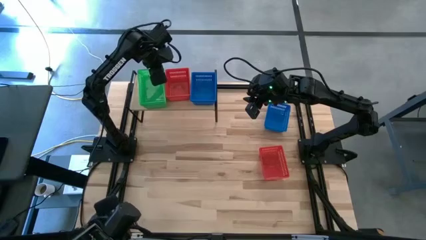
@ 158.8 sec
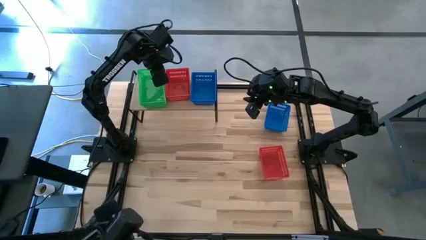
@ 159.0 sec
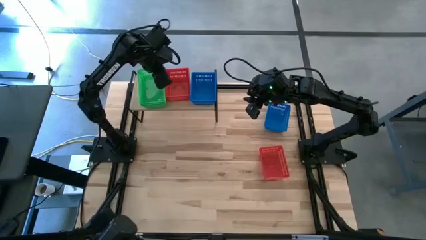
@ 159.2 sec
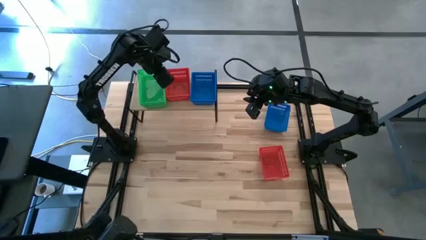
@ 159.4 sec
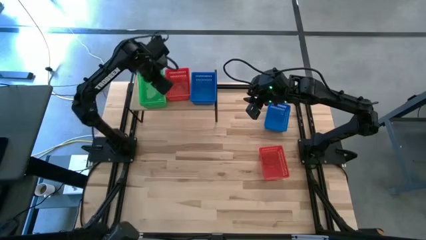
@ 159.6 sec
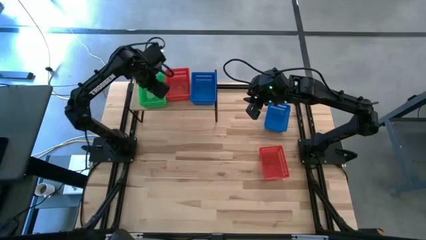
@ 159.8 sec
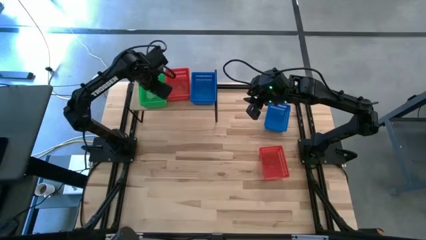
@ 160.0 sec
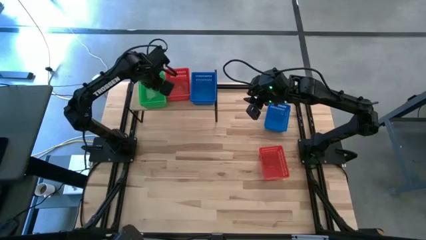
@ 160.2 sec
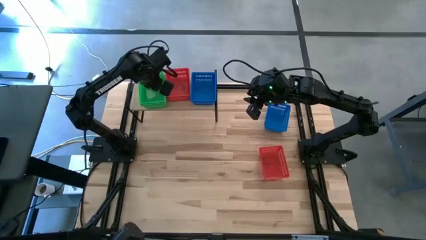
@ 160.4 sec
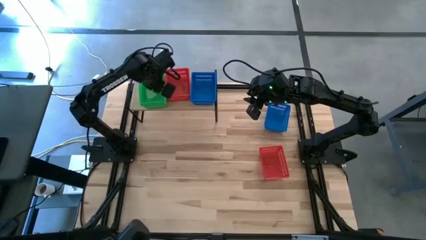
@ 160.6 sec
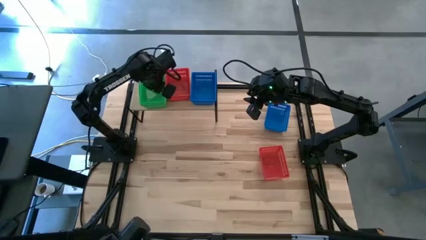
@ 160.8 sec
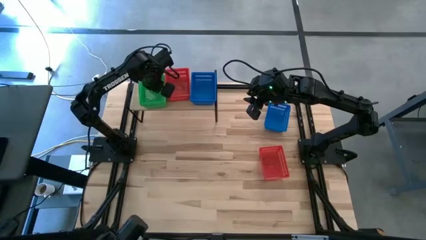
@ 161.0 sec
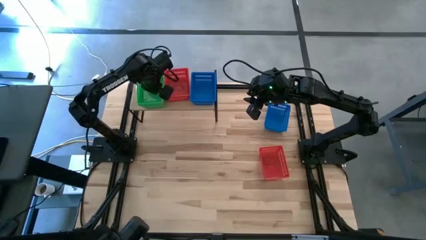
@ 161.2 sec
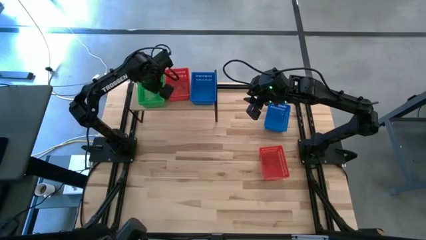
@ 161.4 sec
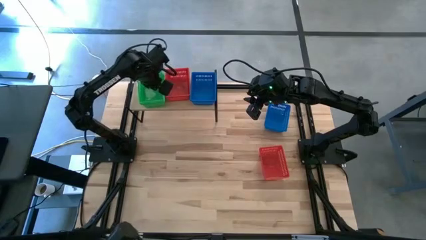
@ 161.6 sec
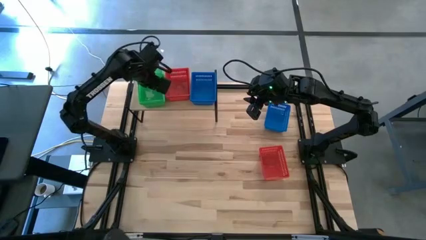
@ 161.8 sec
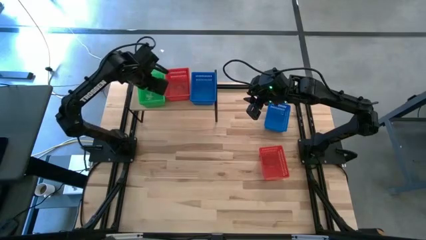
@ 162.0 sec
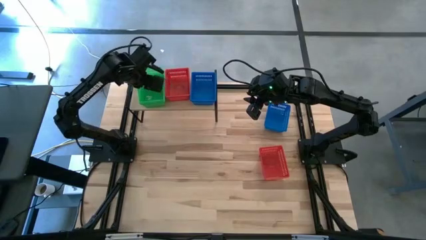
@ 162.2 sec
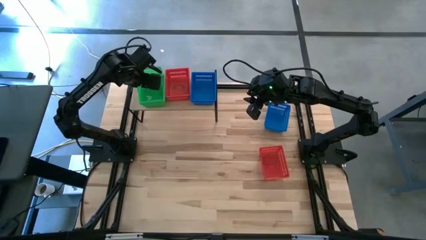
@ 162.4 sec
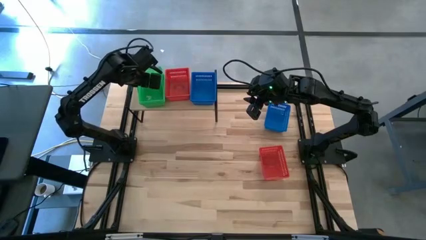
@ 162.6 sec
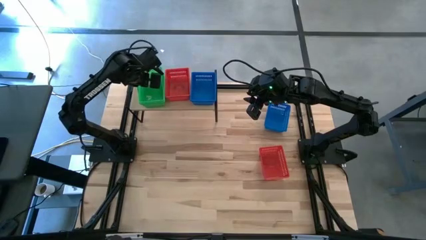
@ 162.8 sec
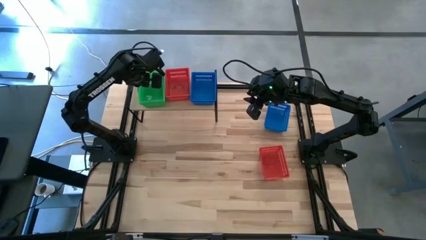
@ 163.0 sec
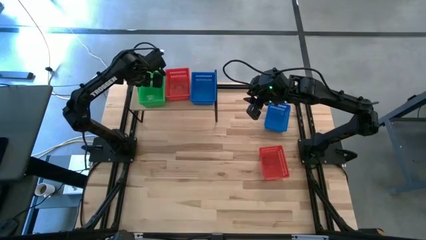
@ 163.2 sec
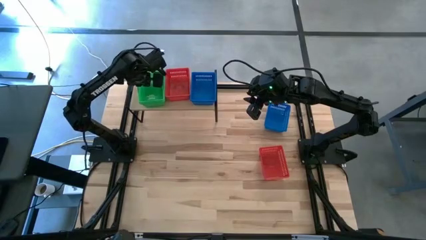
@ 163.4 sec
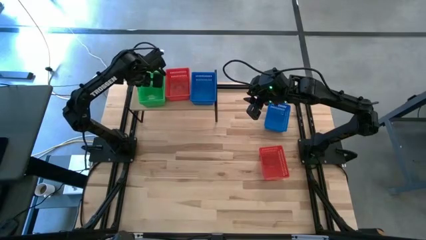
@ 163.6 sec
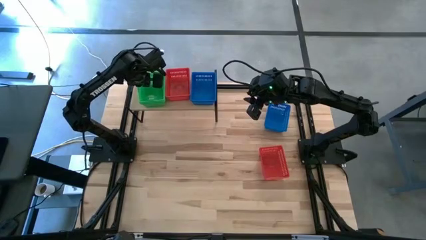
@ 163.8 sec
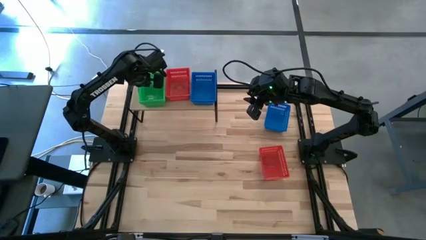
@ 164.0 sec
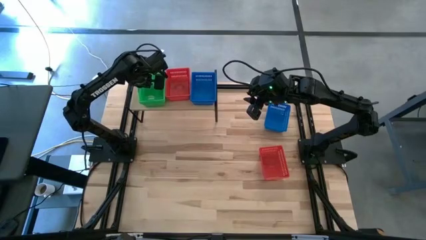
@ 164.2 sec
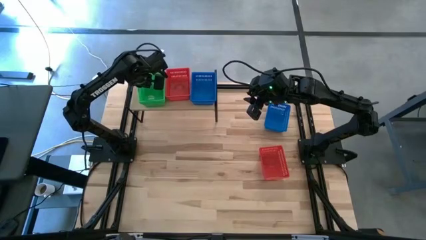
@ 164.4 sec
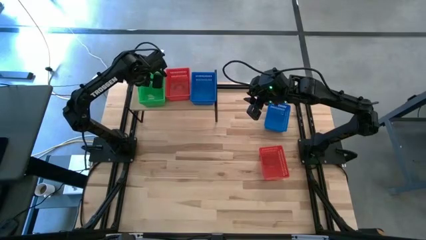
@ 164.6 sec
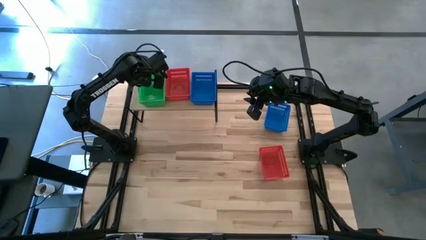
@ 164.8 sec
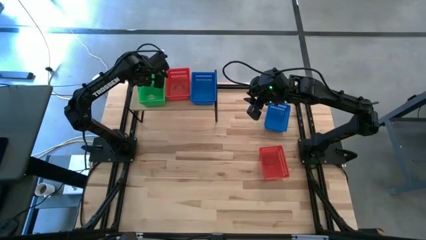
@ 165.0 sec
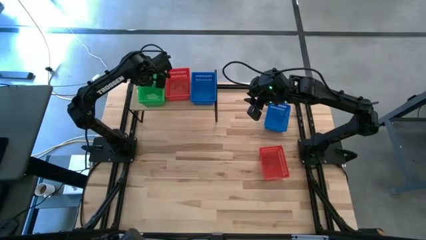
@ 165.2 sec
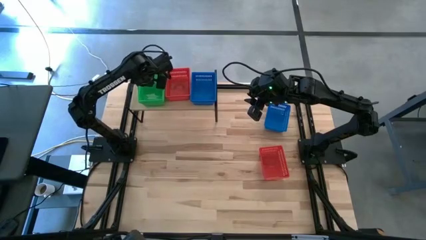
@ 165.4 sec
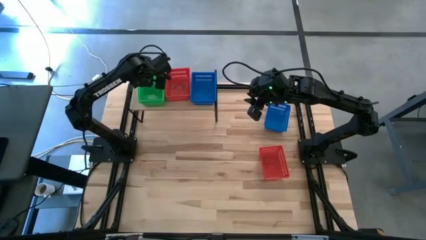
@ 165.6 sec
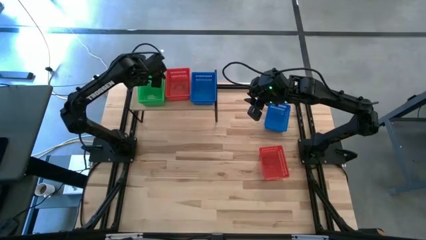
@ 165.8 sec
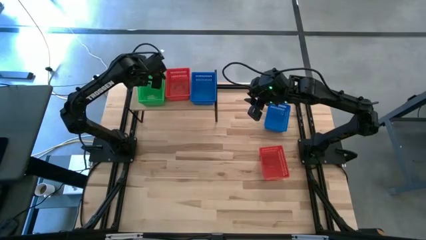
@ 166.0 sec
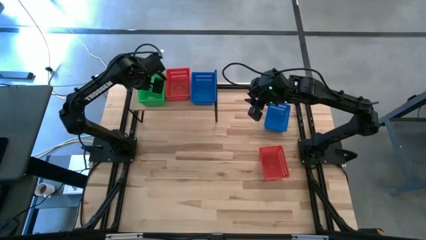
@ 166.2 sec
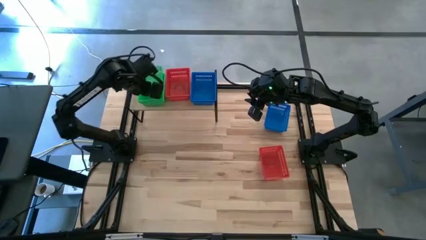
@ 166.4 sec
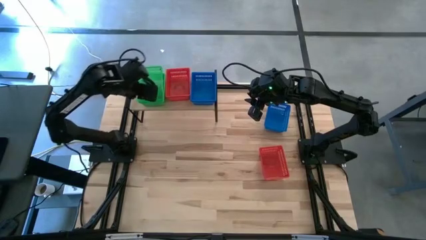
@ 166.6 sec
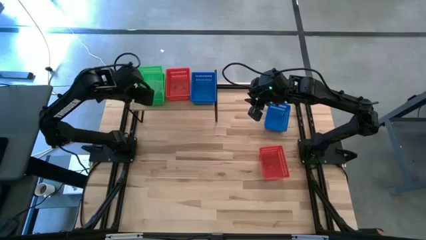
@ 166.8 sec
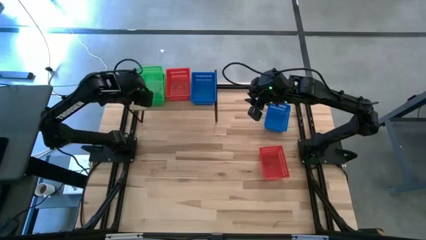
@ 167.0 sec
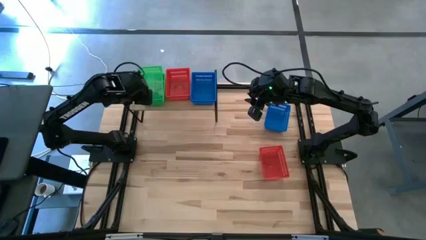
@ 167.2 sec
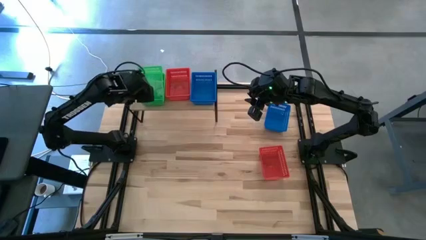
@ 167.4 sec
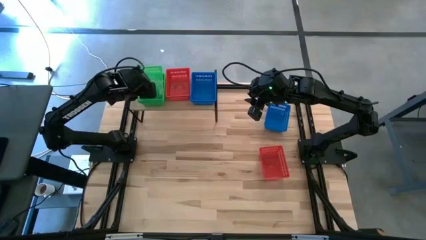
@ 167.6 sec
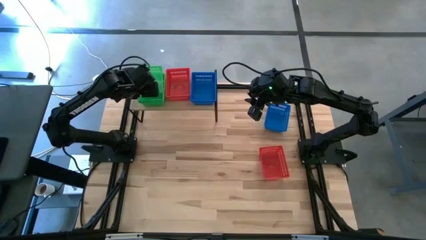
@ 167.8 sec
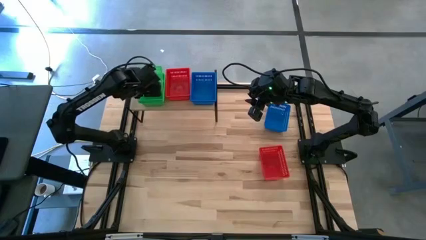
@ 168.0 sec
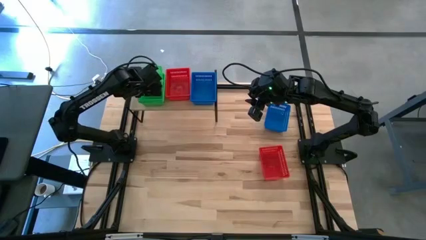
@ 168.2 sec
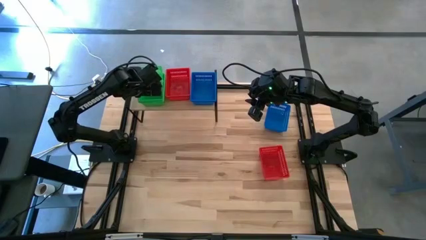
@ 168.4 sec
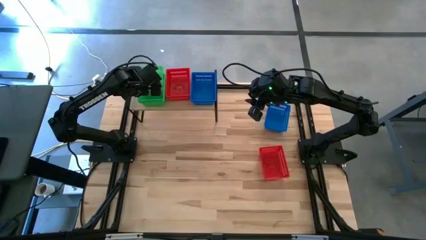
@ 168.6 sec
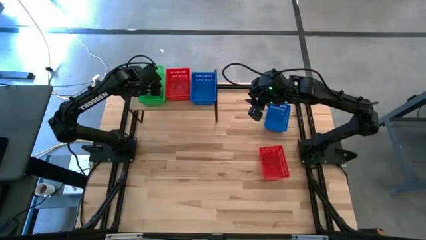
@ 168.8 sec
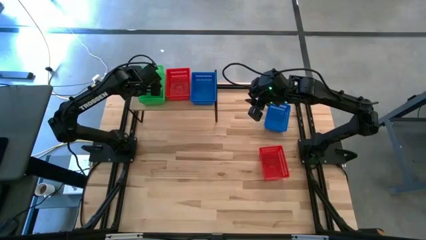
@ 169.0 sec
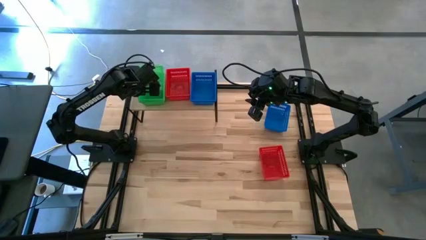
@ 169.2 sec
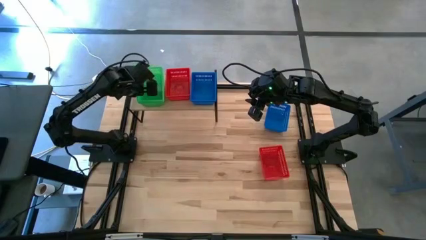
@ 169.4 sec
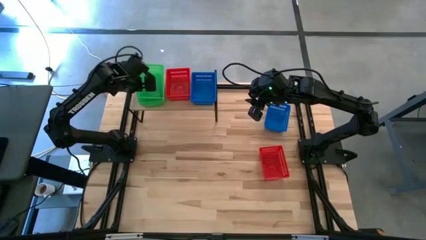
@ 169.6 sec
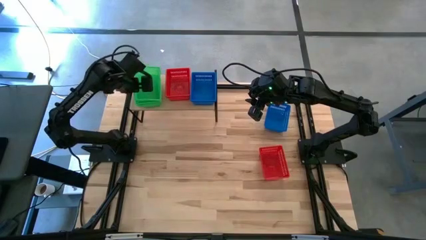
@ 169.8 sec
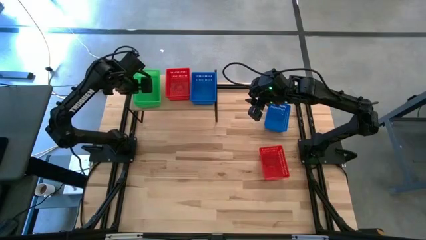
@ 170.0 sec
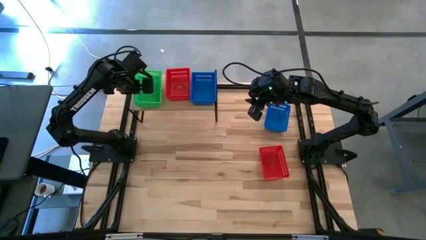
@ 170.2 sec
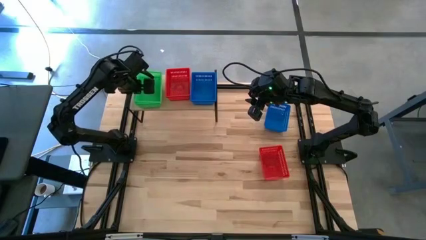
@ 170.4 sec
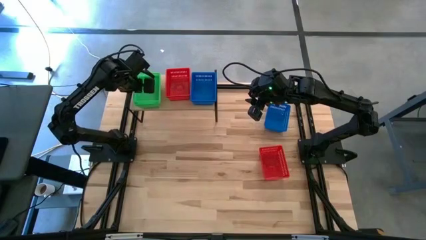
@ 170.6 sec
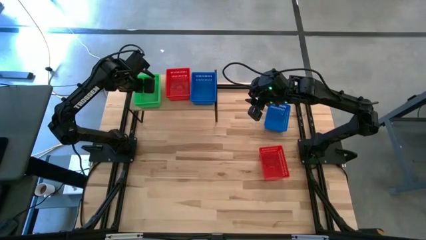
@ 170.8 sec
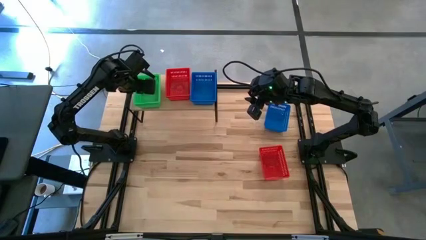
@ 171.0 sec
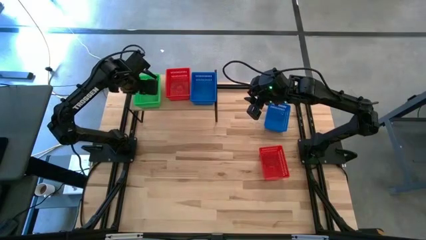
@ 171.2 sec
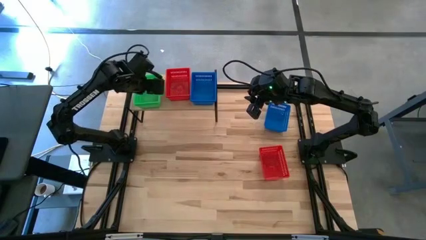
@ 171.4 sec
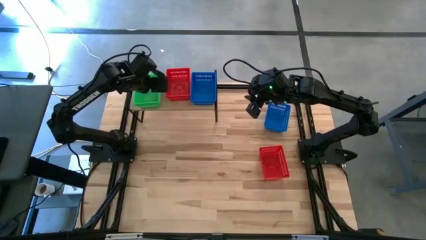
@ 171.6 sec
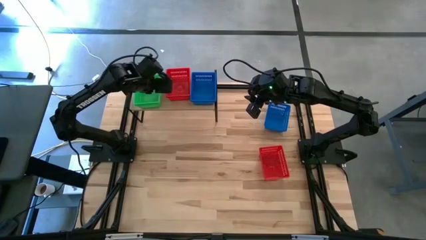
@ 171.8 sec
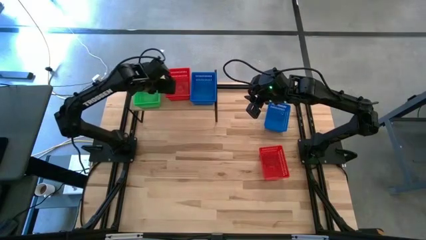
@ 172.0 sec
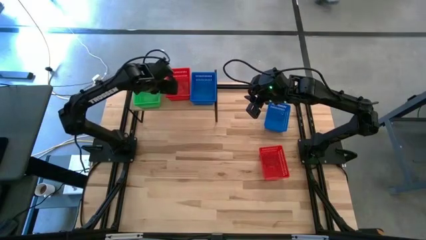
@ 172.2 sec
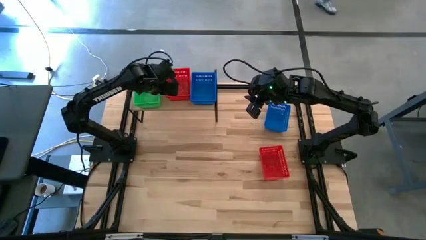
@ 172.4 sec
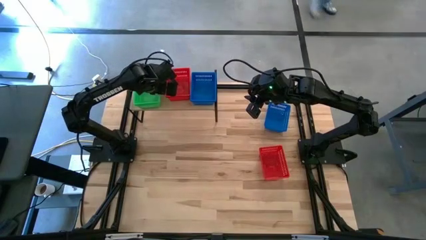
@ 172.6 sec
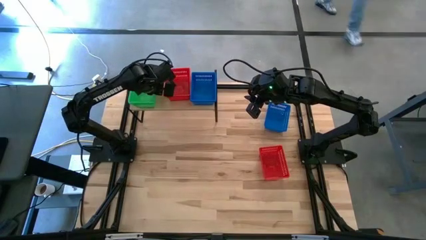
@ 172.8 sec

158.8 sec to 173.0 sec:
Task: Stack baskets on shelf by color
Stack the green basket on top of the red baskets on the shelf
